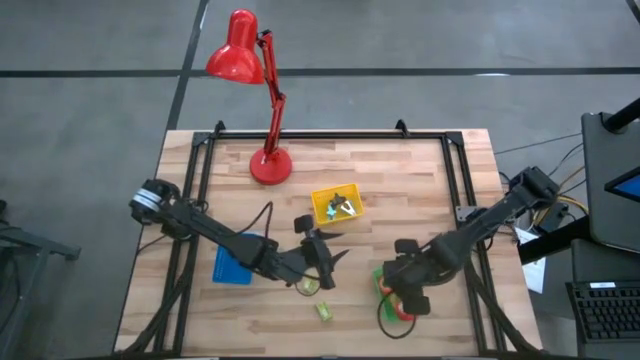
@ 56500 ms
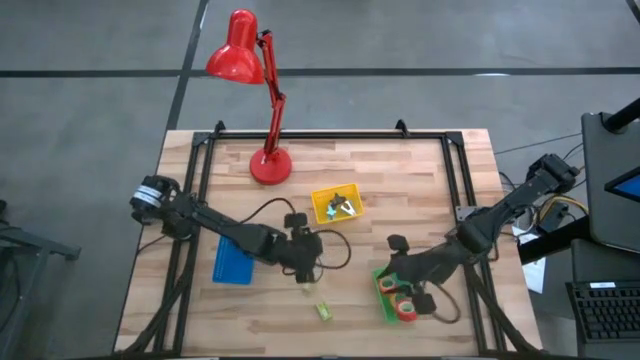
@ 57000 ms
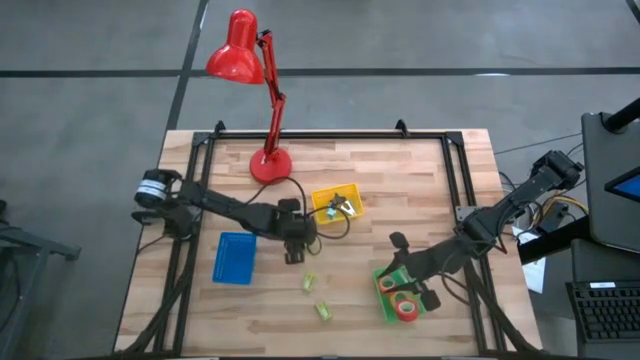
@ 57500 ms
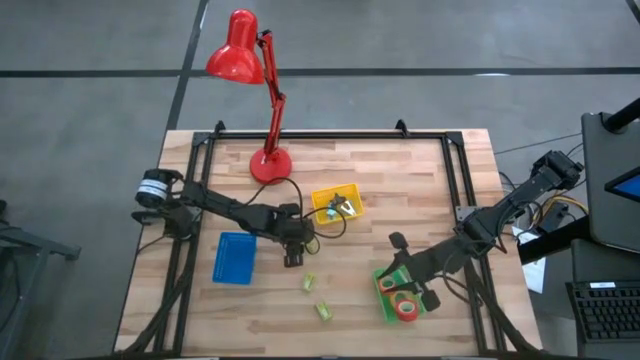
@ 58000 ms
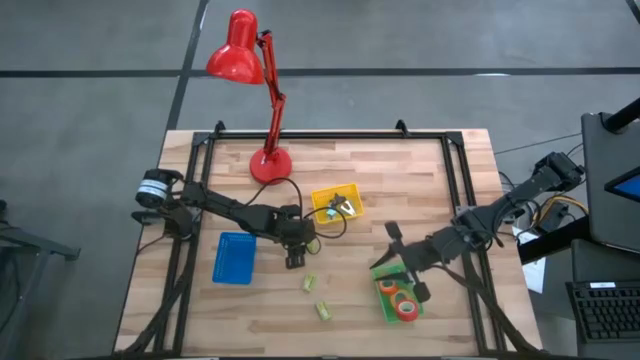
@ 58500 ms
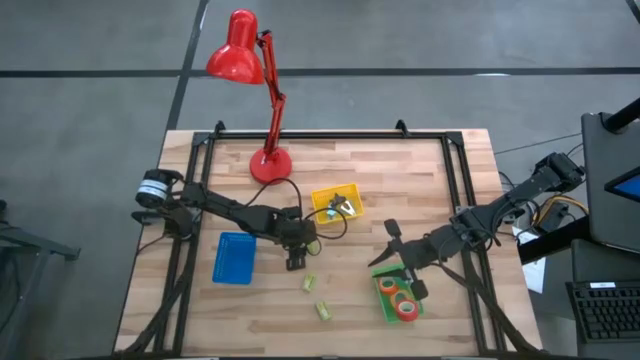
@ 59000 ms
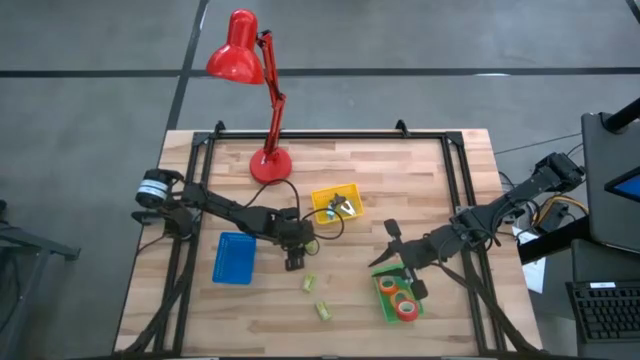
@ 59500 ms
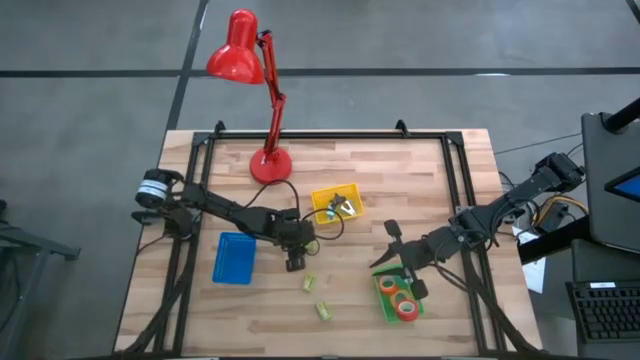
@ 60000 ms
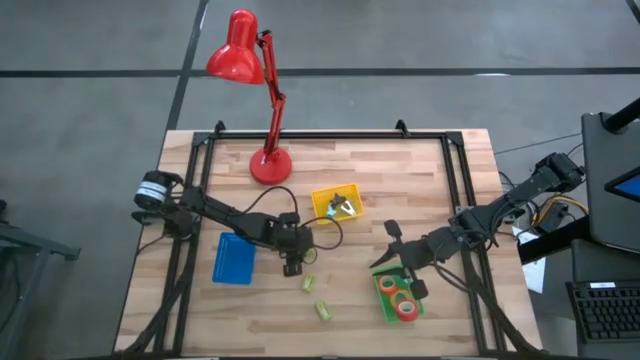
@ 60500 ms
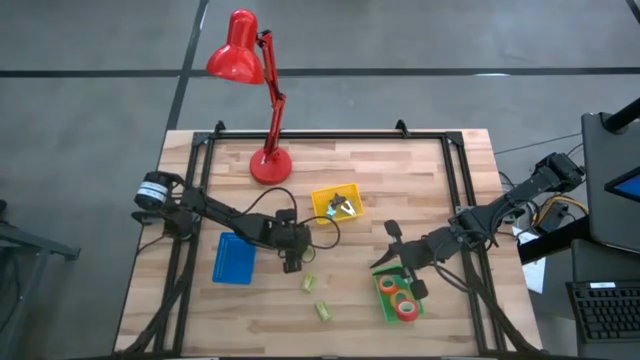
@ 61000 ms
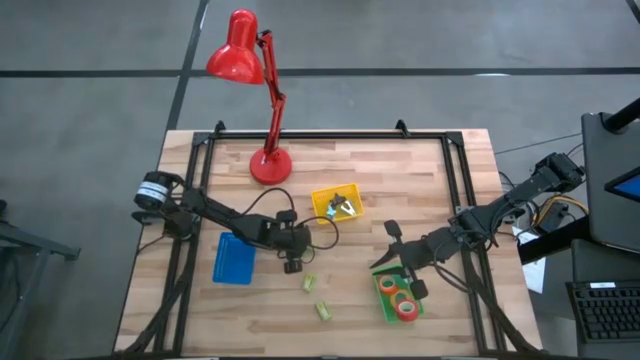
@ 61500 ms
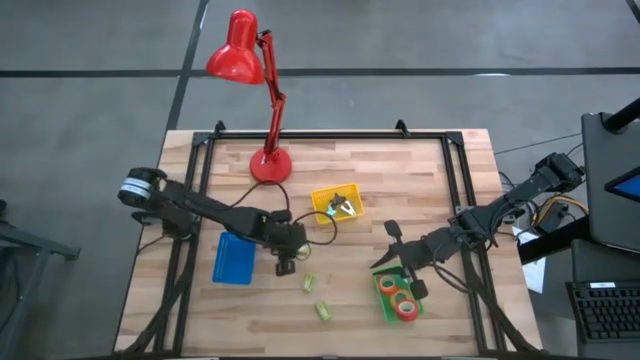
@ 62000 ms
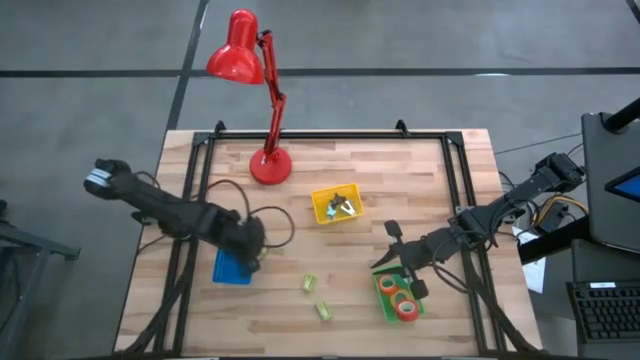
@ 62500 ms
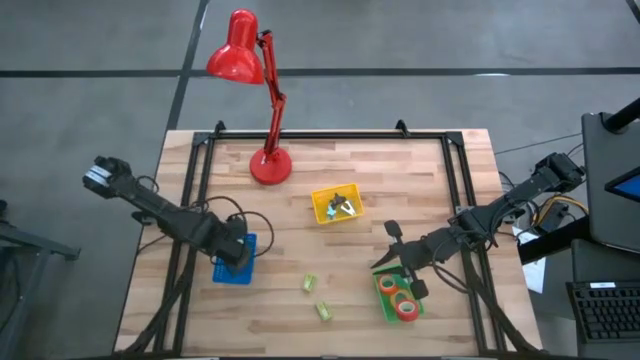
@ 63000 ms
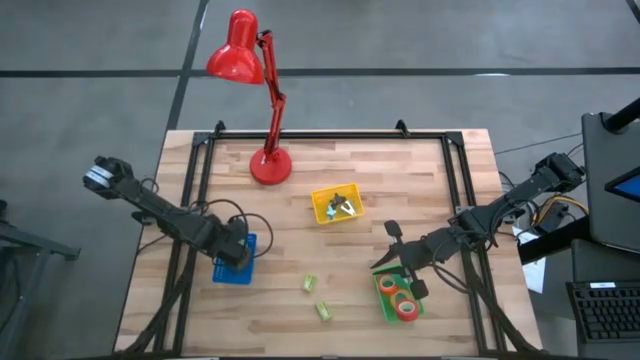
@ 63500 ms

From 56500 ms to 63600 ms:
Task: Pick and place Stapler, Stapler remover, tape
Put the top green staple pins into the blue bin

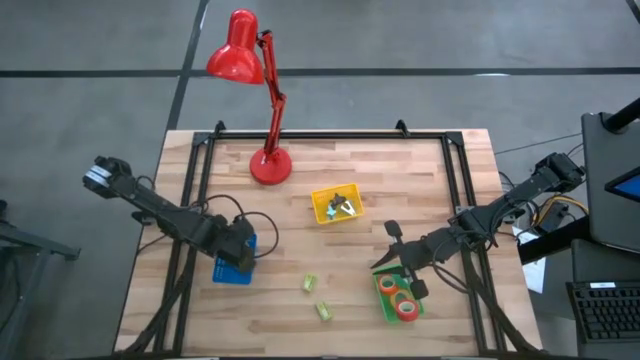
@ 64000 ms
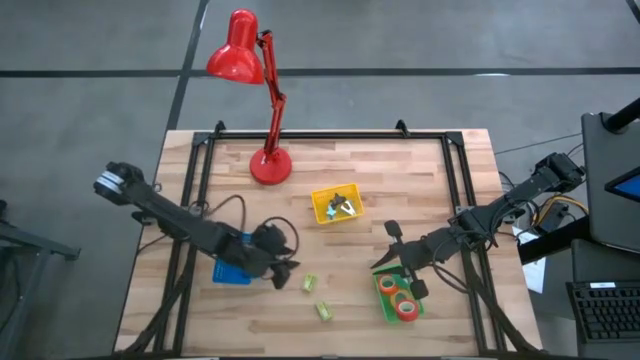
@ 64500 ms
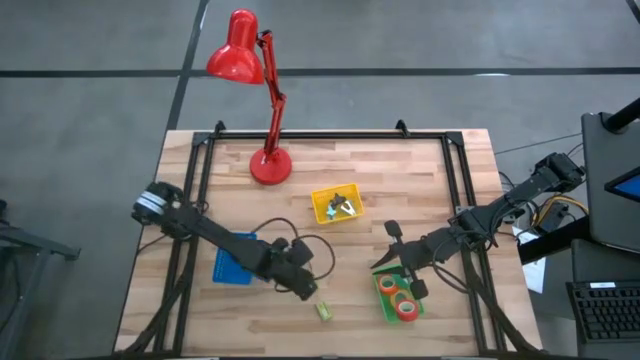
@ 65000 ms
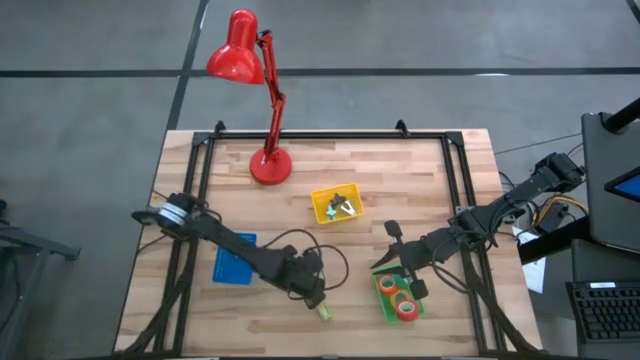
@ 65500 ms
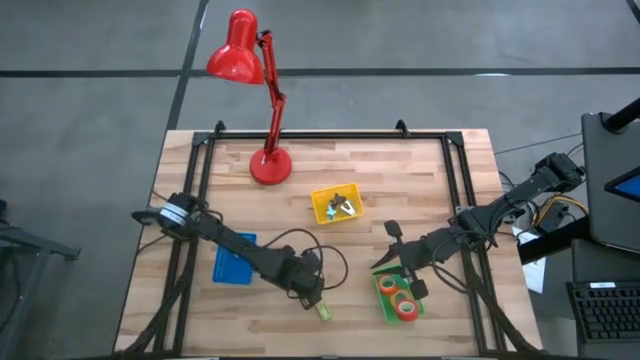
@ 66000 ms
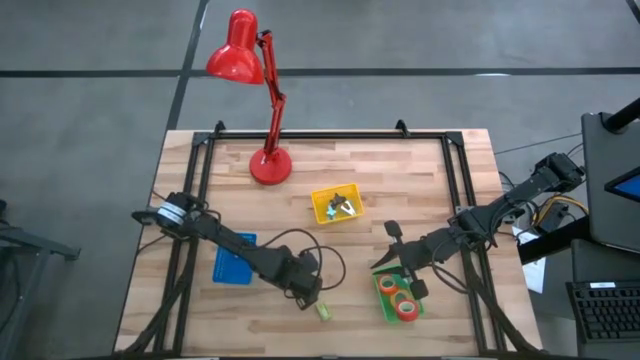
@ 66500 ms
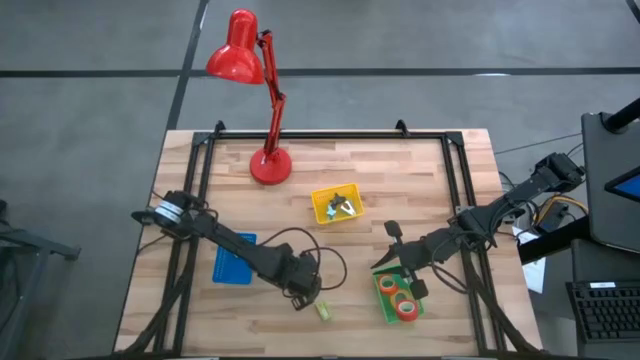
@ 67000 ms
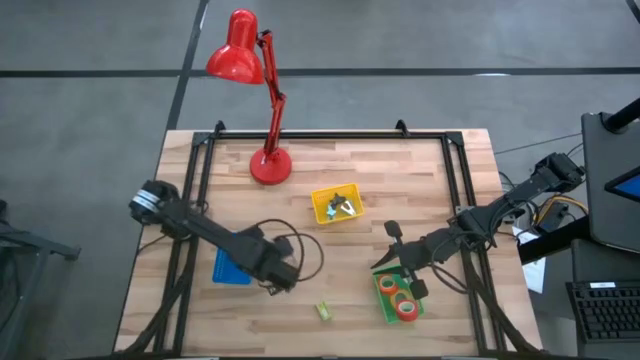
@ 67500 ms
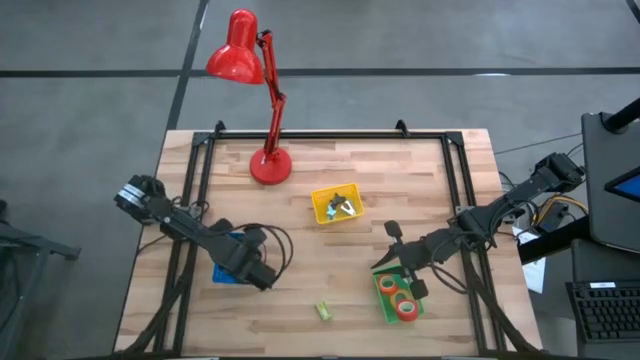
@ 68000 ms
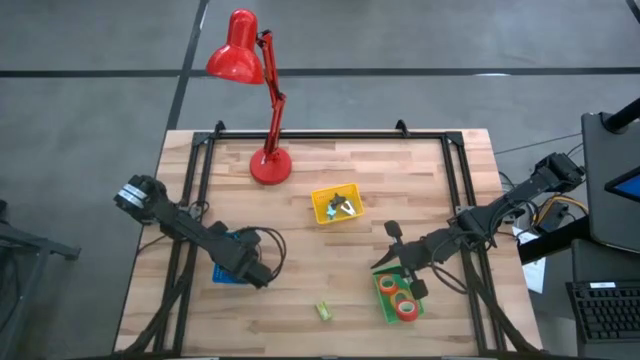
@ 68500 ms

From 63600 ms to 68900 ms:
Put the top green staple pins into the blue bin

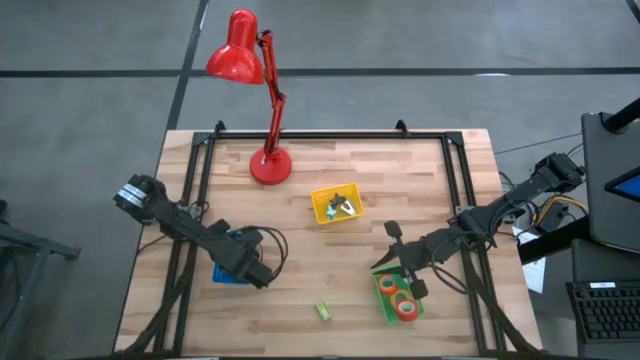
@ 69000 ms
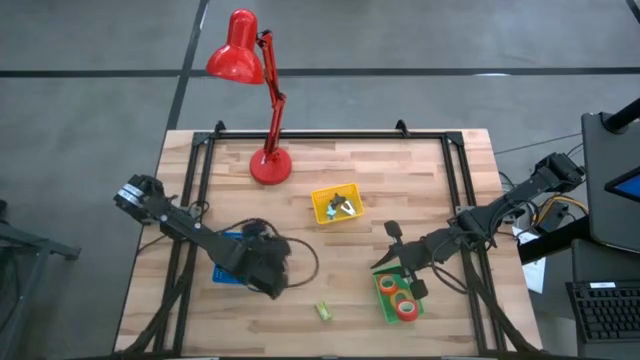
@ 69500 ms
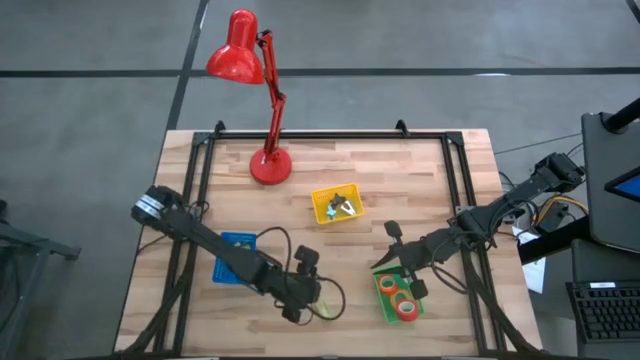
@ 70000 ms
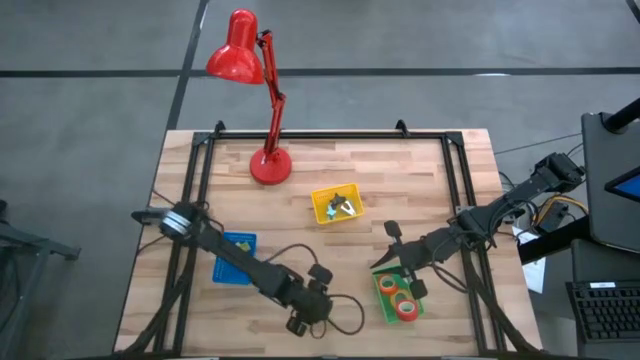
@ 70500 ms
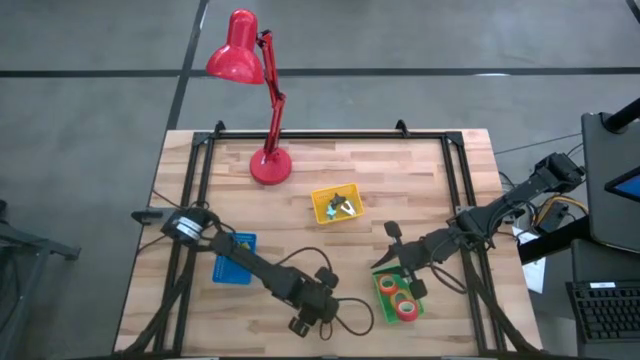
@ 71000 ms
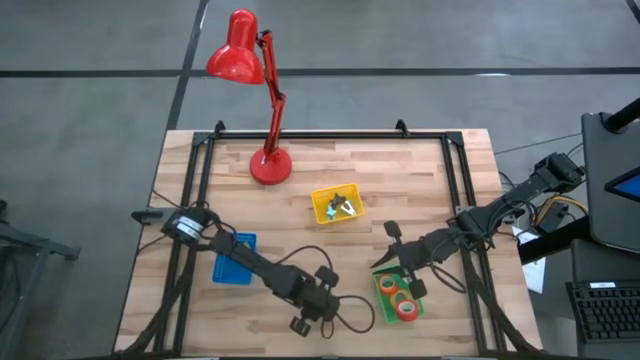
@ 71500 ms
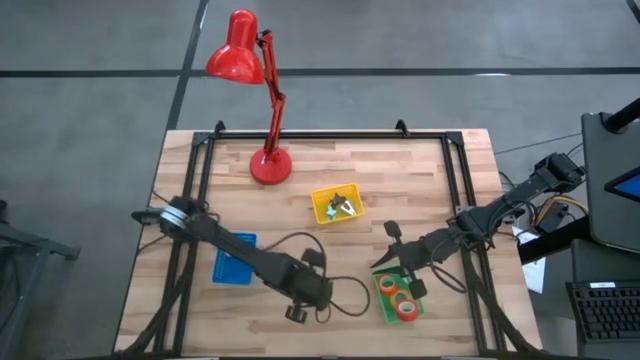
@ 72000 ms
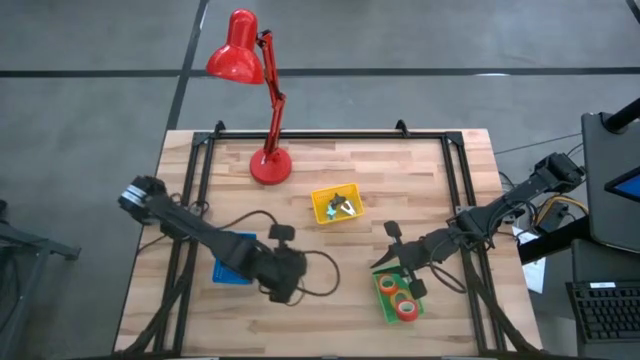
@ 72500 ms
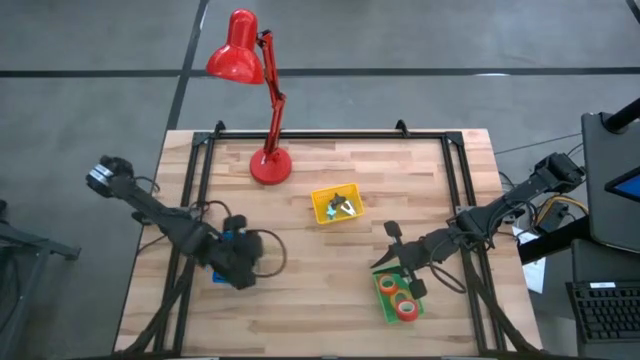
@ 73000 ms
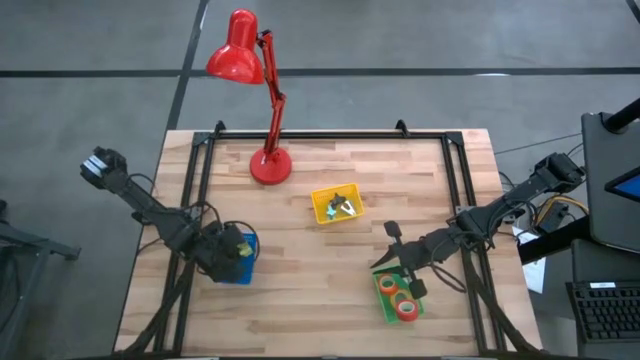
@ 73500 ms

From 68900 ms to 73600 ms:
Put the green staple pins into the blue bin

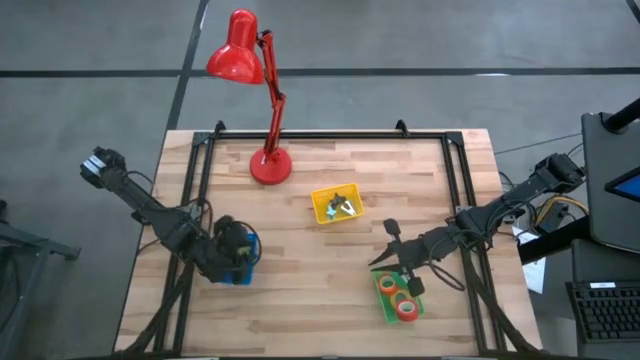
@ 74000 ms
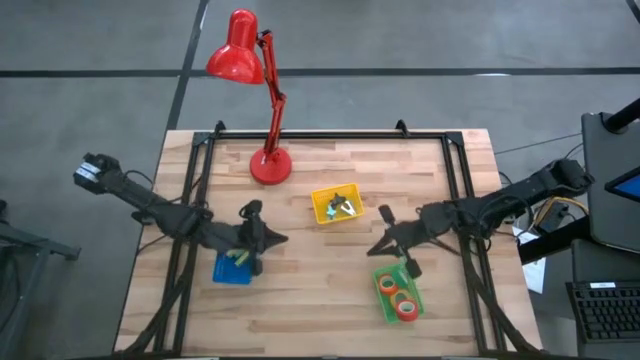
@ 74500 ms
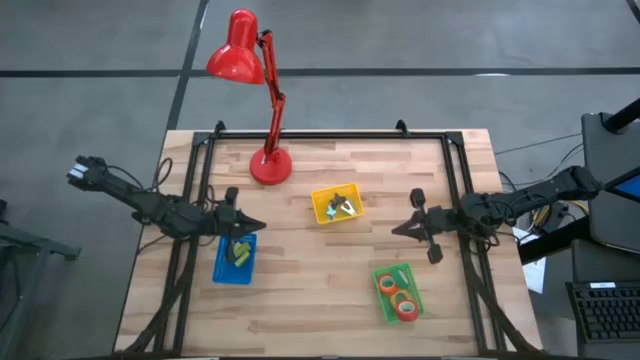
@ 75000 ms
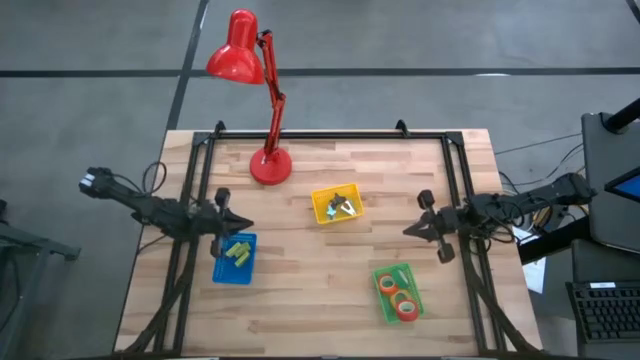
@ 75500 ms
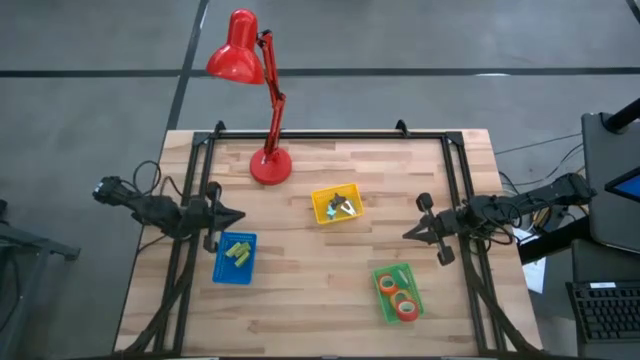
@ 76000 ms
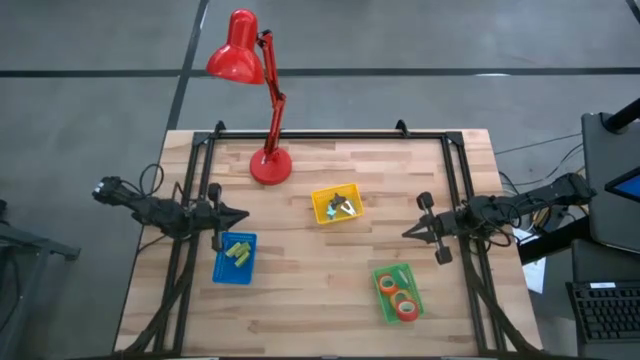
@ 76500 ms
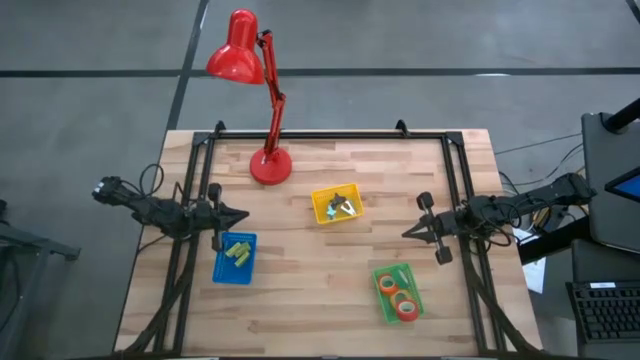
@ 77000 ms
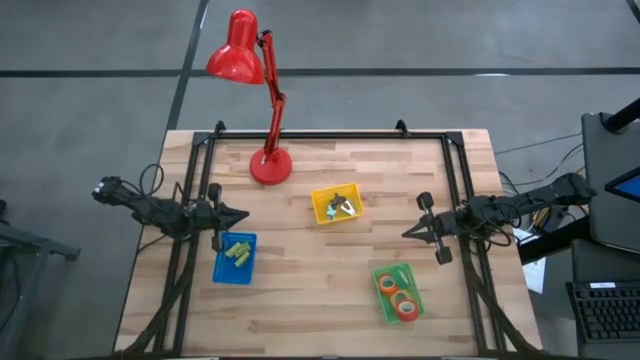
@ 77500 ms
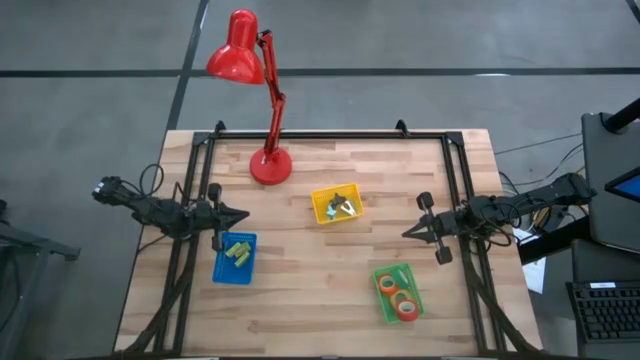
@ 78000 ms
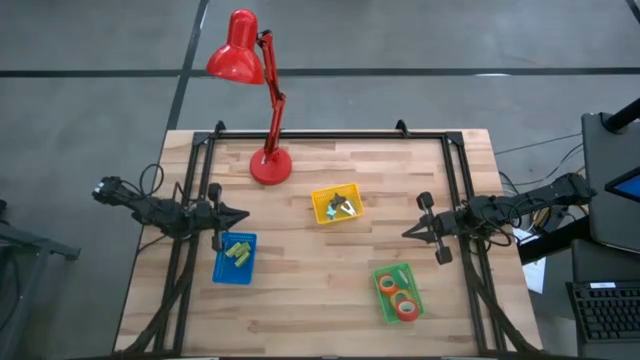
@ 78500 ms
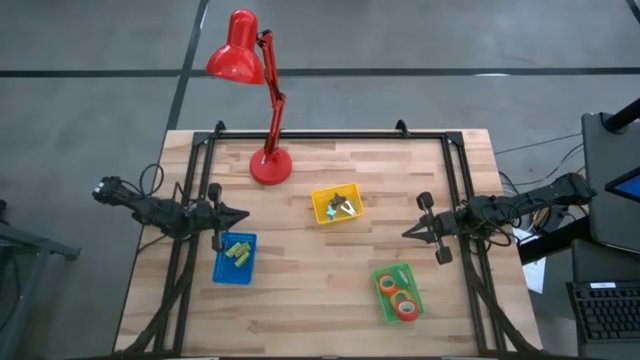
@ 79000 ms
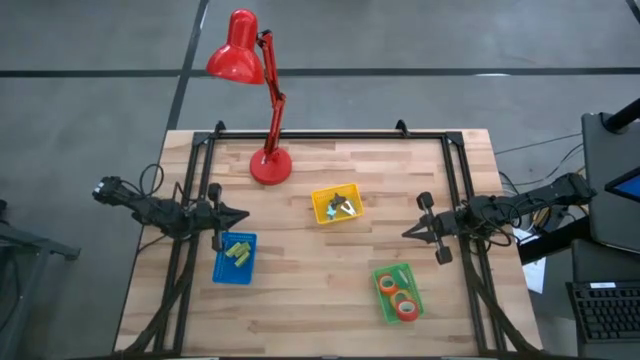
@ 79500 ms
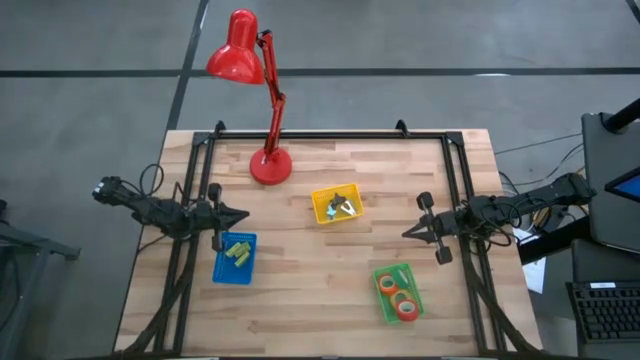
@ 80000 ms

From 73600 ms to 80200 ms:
Return to Home Position
